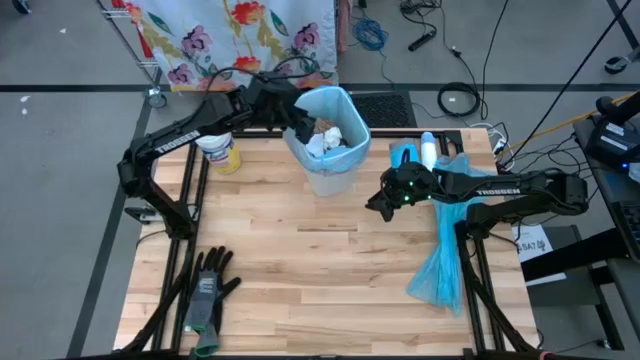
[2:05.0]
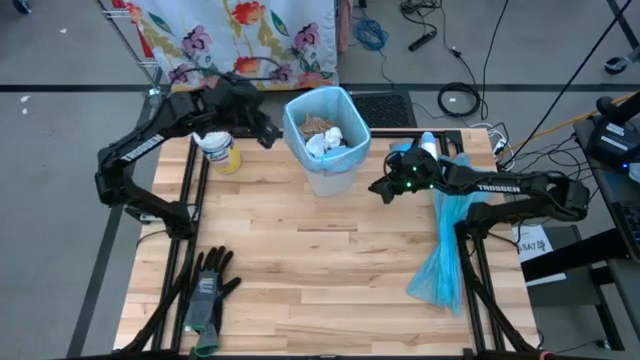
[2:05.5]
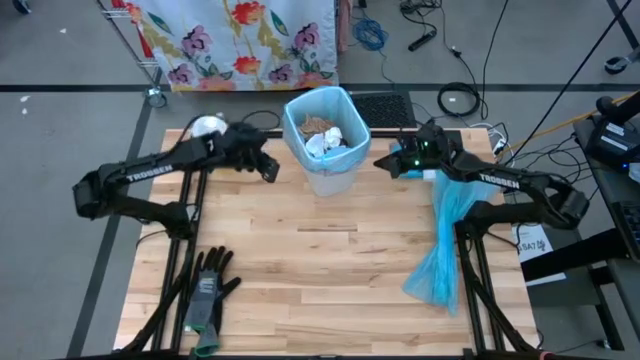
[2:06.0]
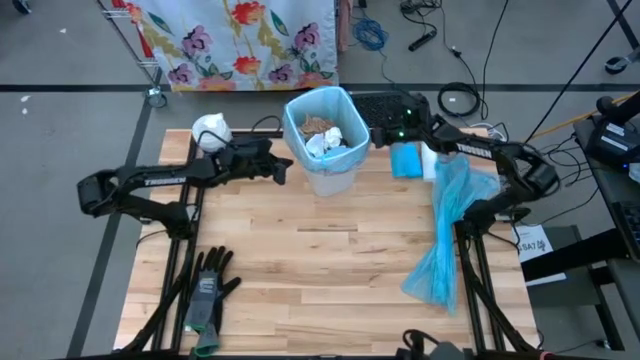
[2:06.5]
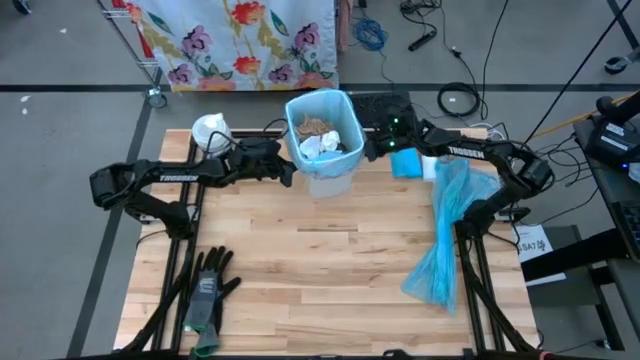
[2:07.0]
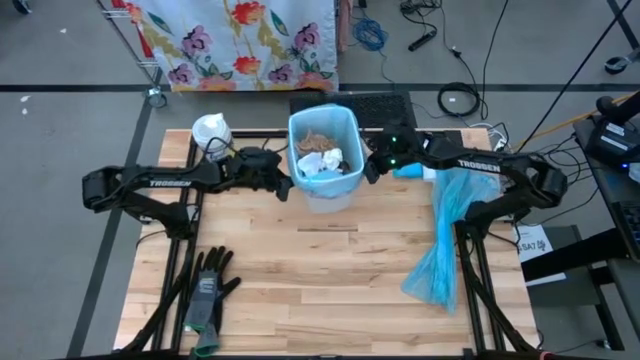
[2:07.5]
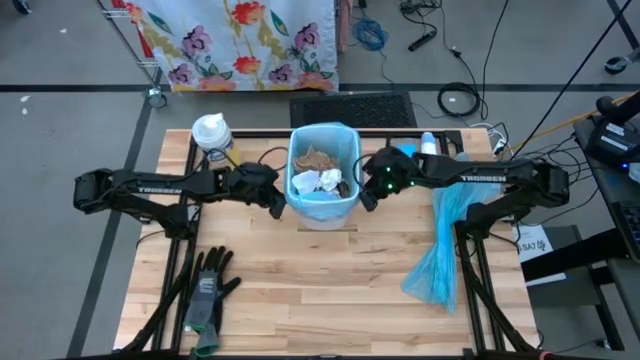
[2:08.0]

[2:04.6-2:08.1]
Task: place trash/remove bag and relplace
Move the trash bin to the center of other table

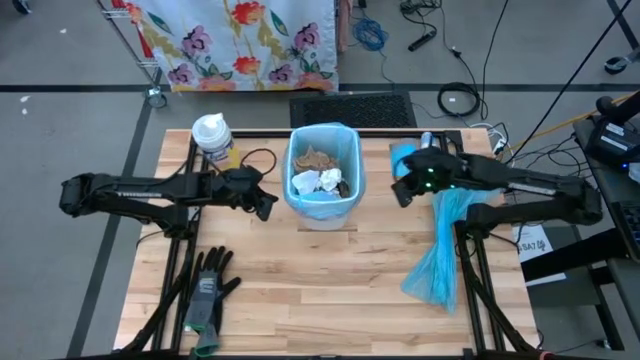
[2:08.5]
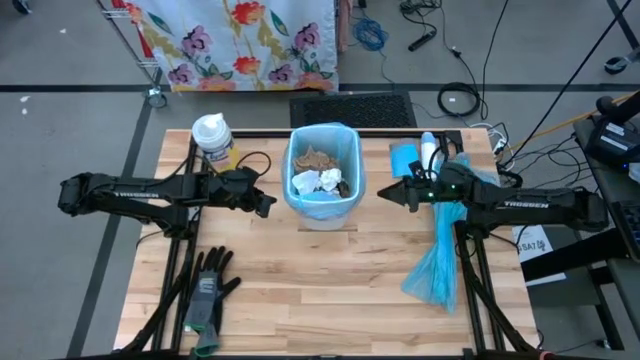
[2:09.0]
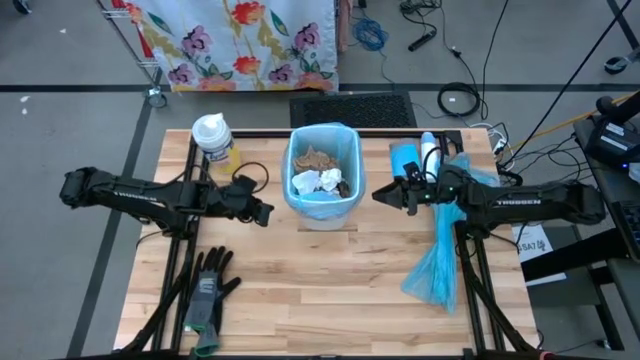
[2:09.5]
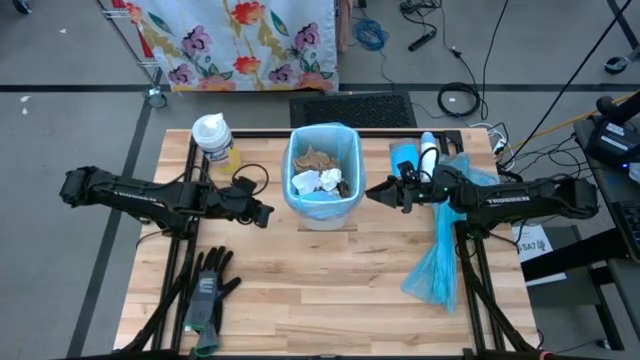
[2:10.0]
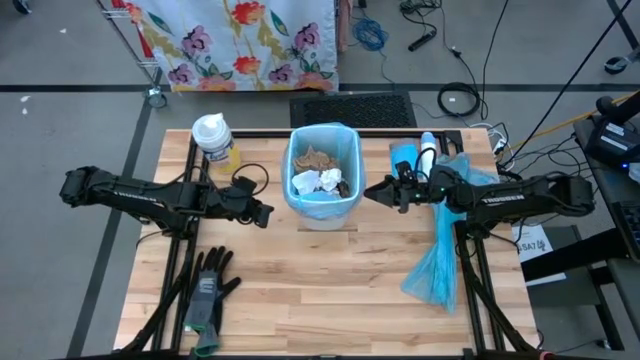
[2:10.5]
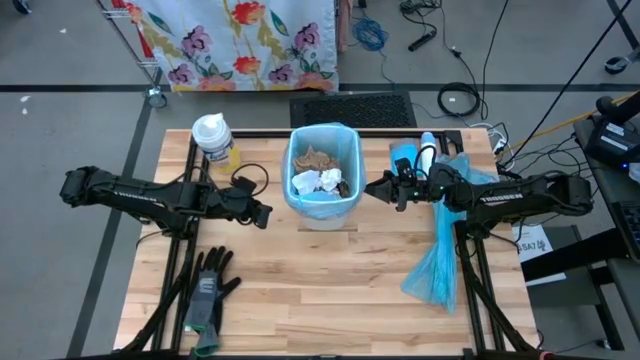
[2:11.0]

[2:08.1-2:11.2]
Close the trash bag

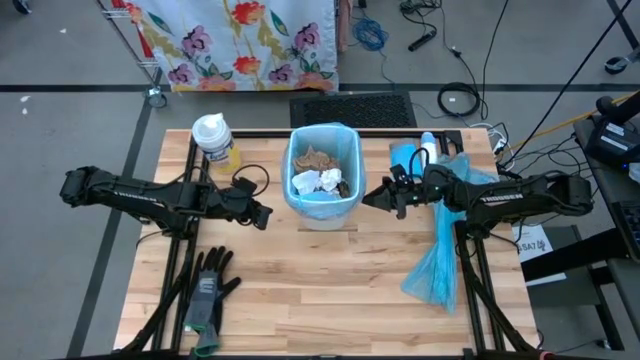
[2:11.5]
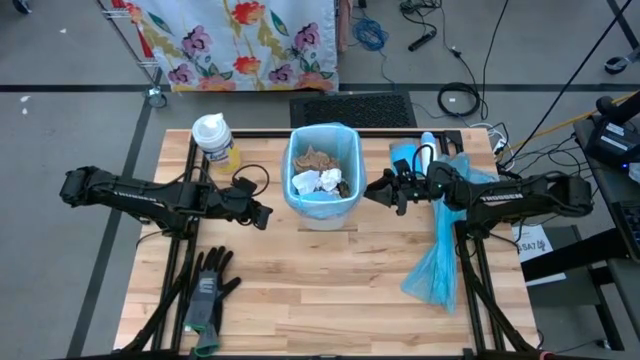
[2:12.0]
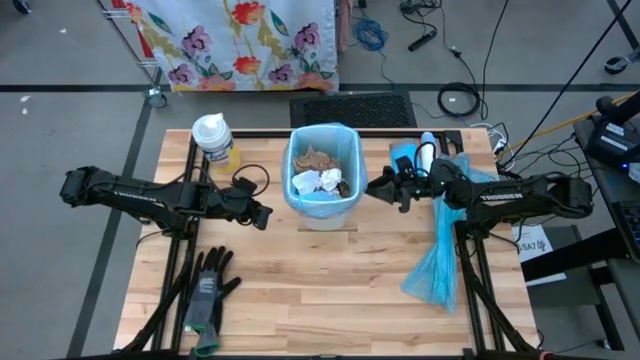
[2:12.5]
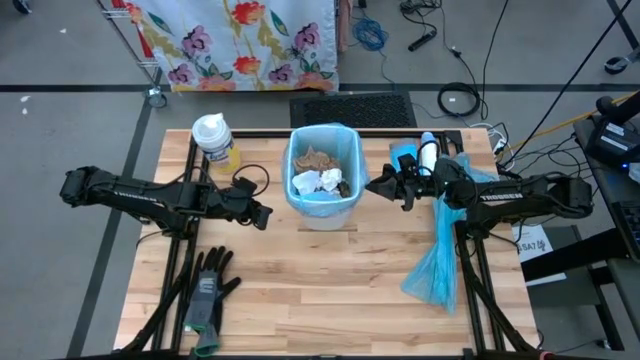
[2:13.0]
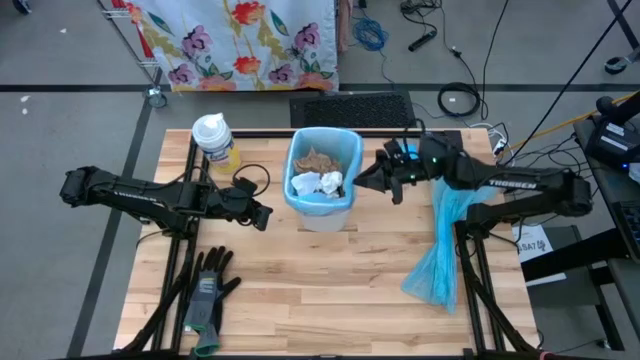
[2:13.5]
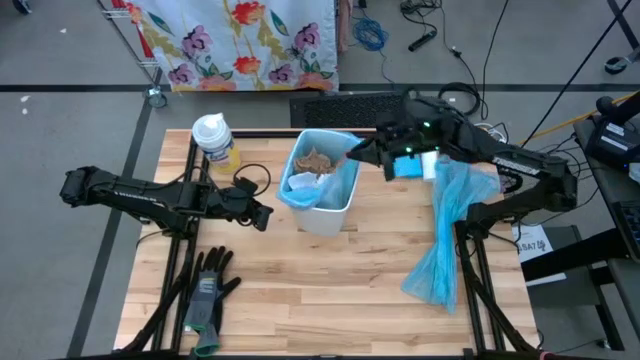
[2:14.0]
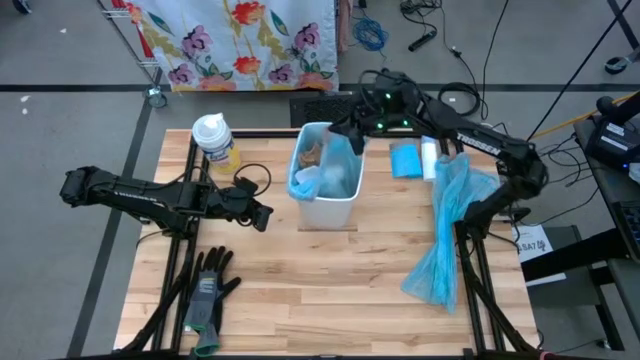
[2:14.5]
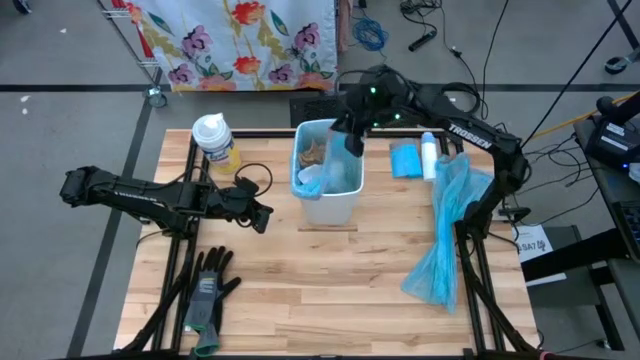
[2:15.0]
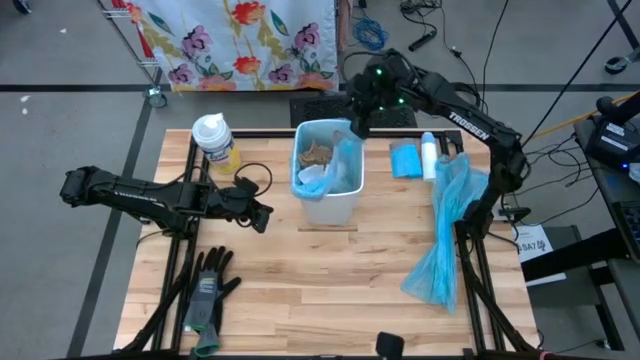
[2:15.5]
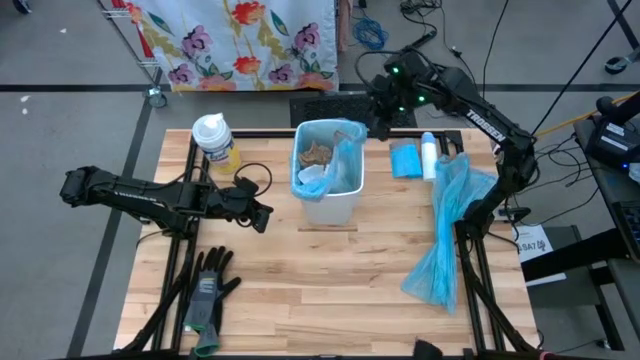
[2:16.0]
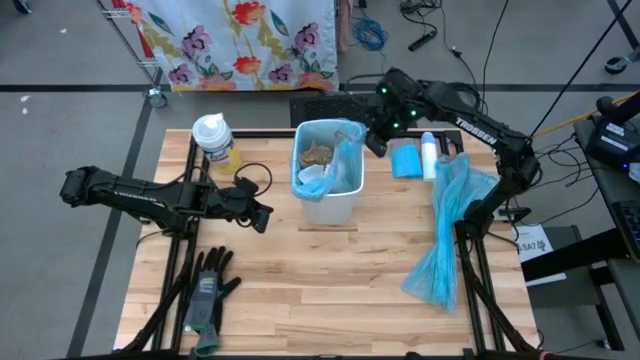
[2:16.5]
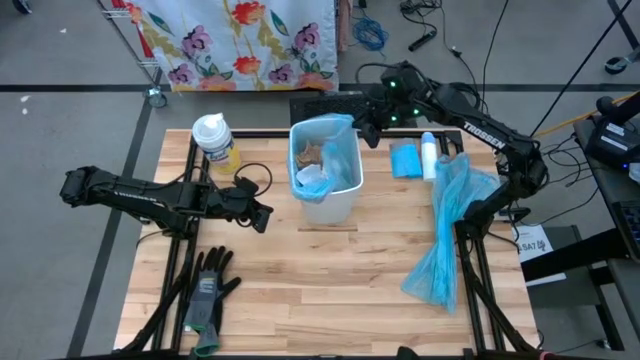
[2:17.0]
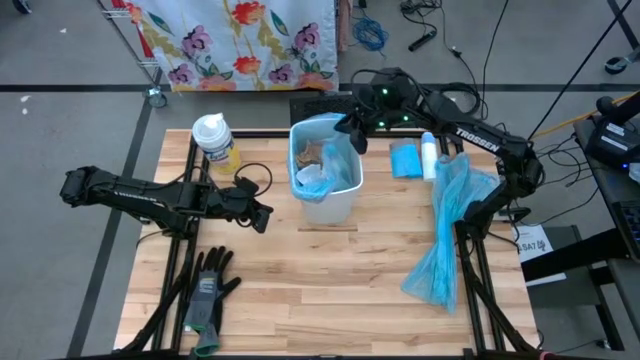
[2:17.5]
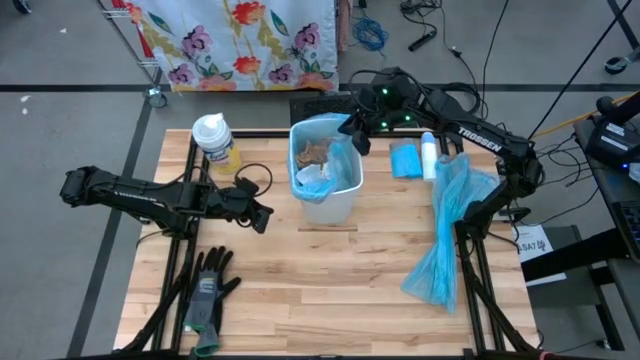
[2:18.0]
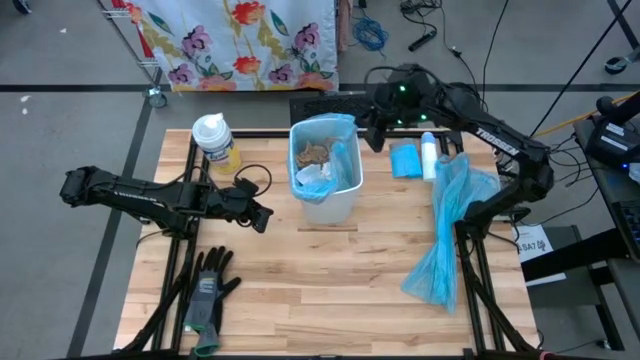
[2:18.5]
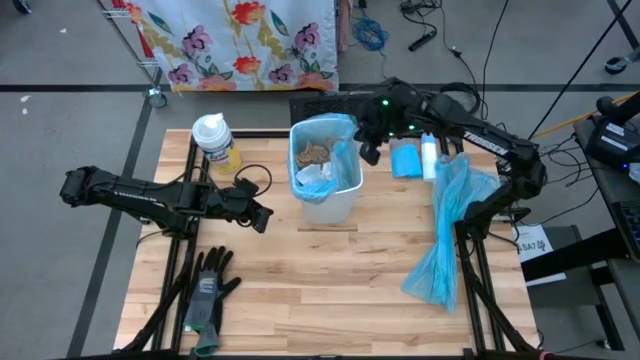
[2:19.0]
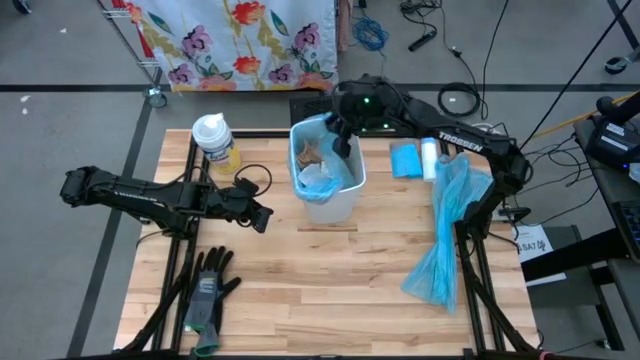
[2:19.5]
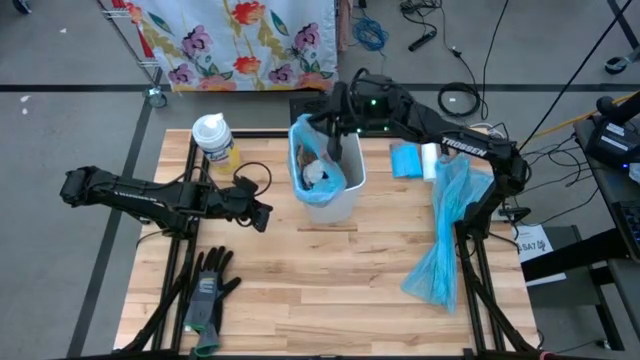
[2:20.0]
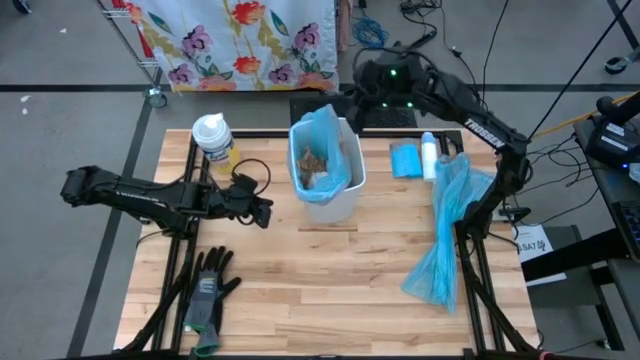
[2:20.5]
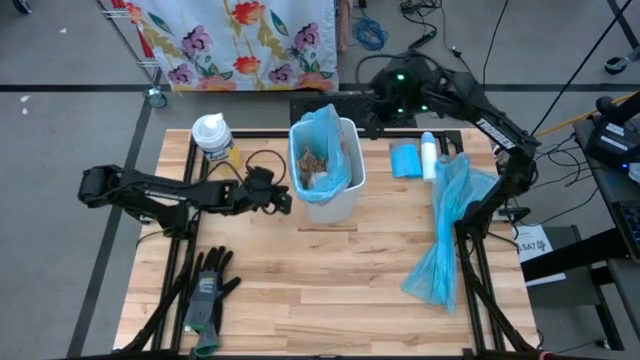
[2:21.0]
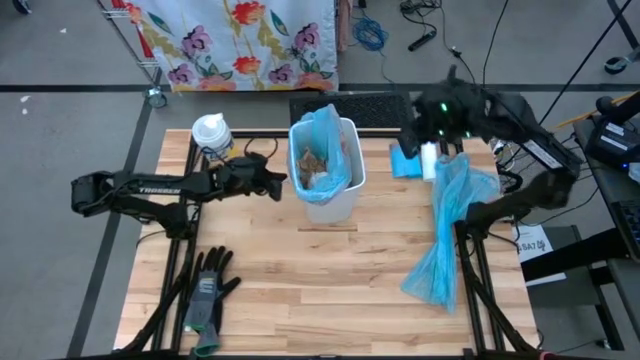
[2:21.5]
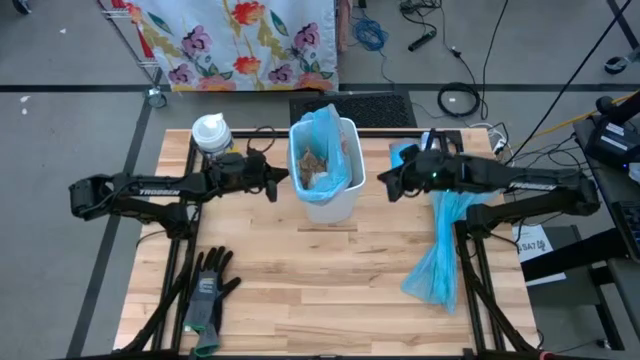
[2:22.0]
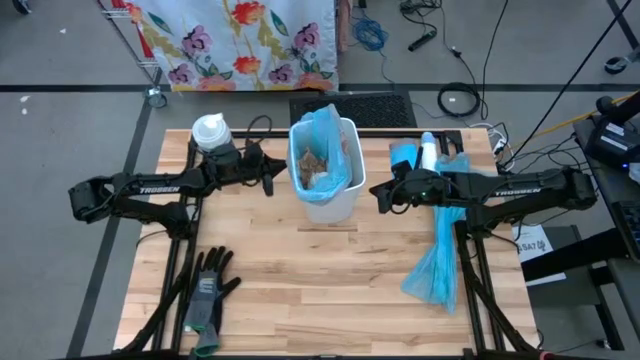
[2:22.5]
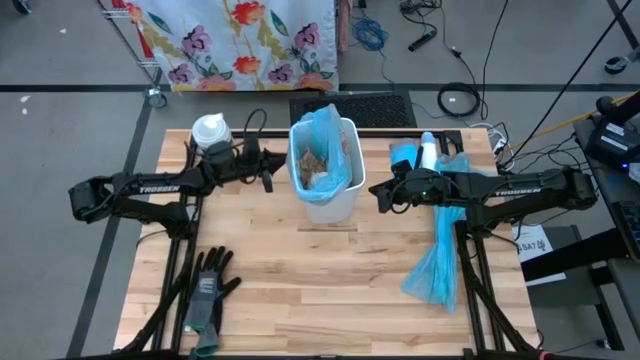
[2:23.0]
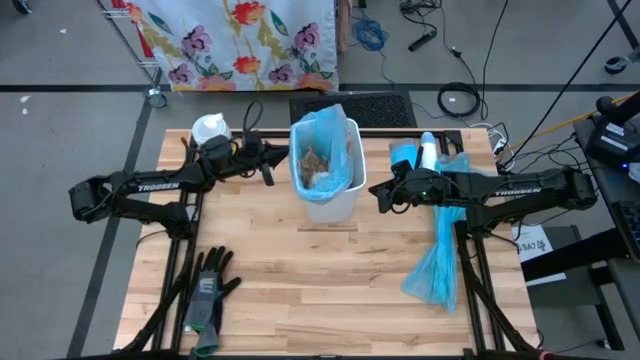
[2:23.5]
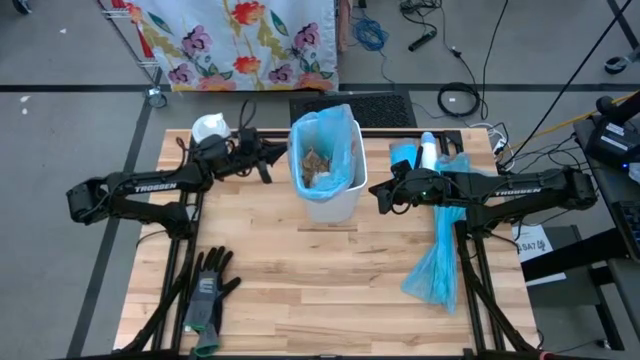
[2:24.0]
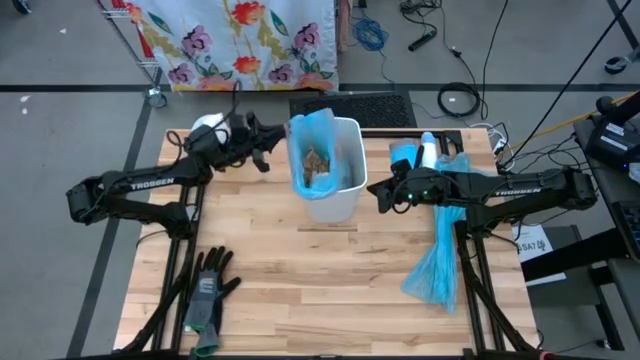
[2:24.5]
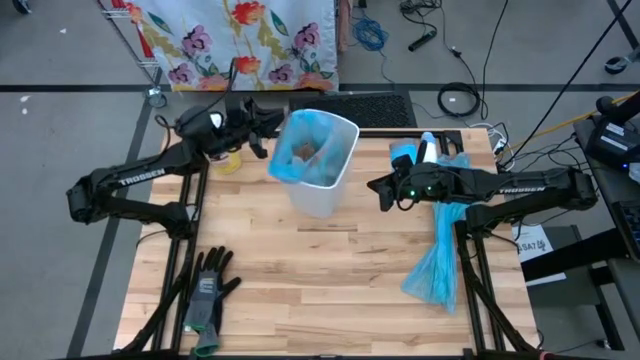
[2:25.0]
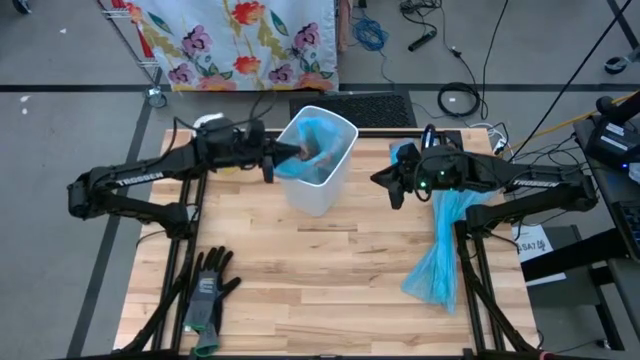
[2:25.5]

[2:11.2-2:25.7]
Close the trash bag
